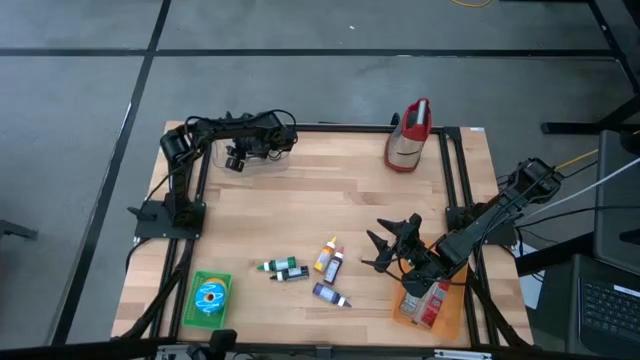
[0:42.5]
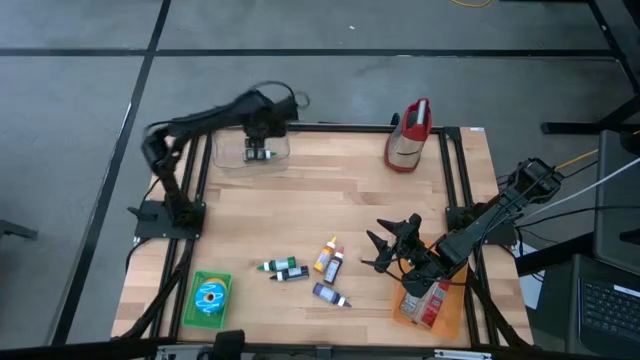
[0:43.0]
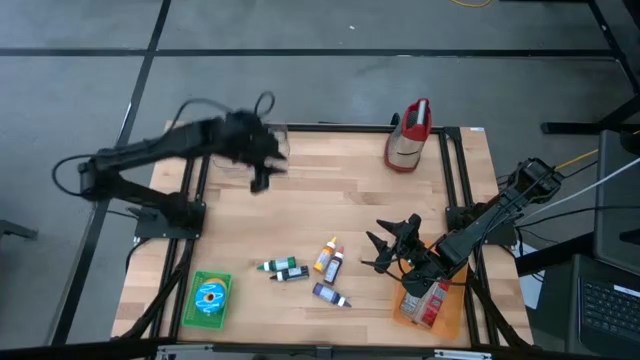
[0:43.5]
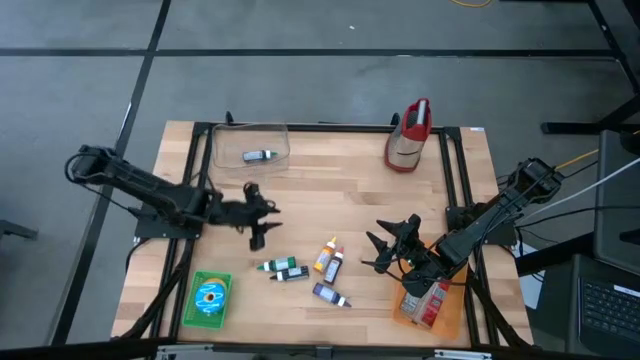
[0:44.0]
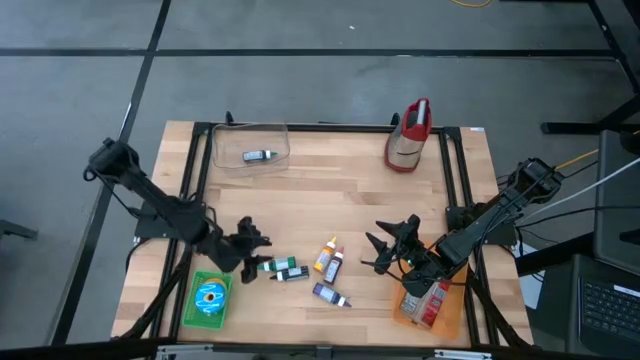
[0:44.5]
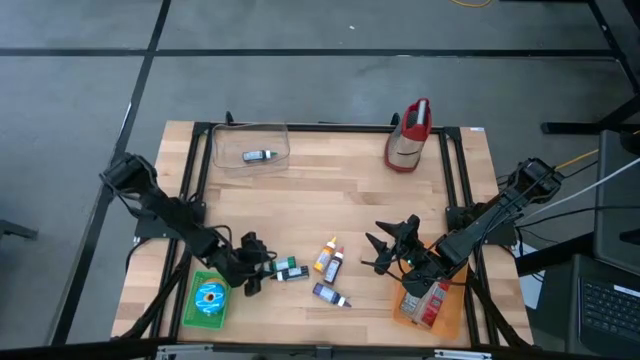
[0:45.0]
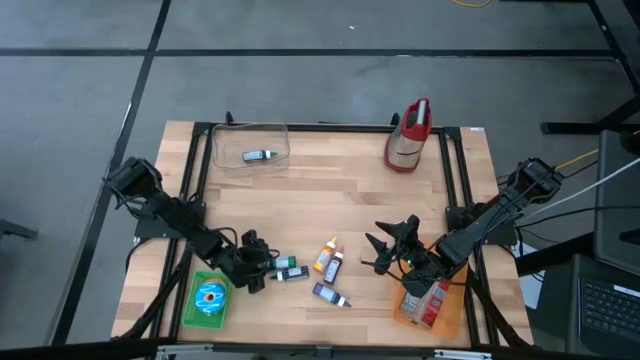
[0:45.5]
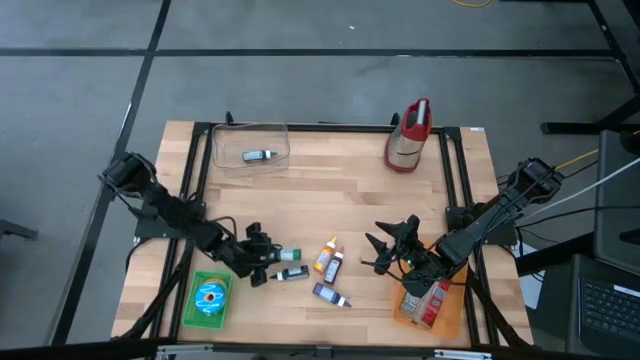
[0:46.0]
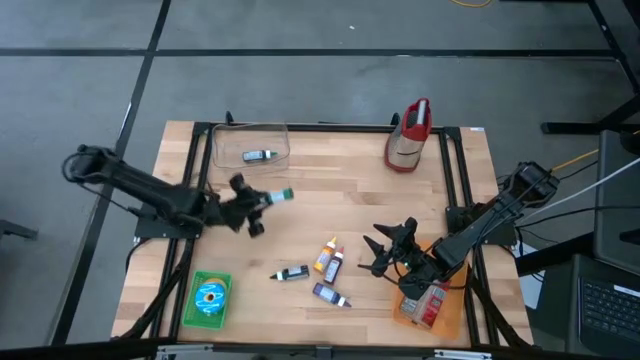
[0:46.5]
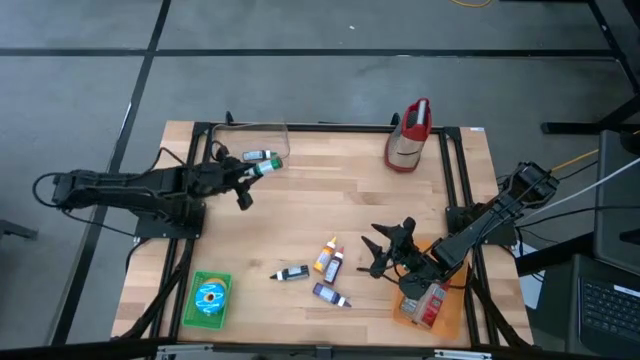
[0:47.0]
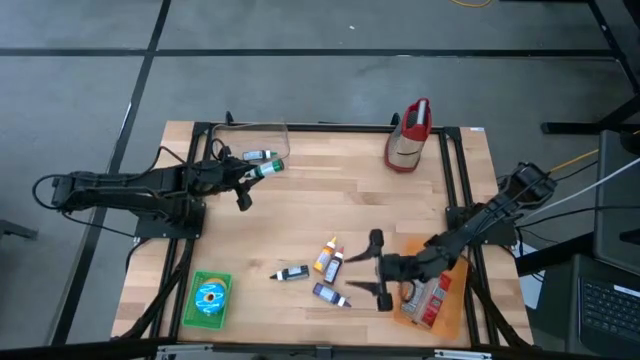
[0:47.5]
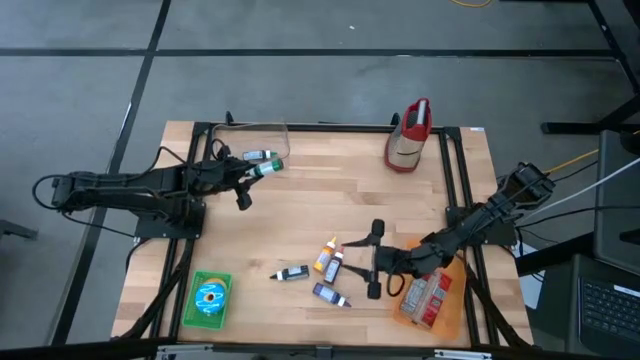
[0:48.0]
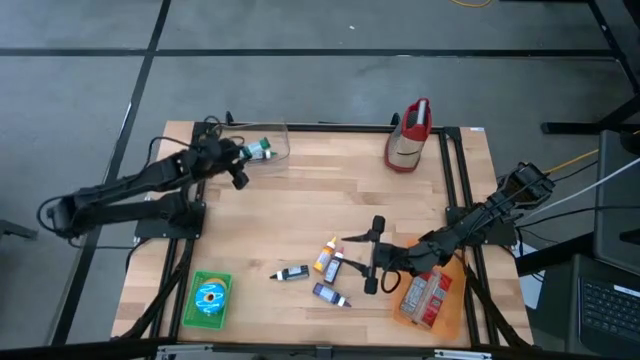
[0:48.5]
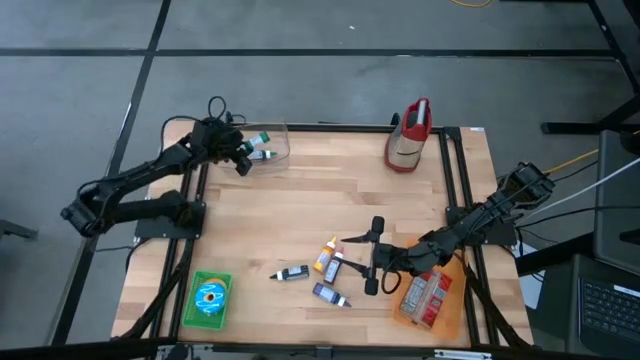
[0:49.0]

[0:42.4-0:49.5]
Put the green food coloring bottle into the white transparent bin

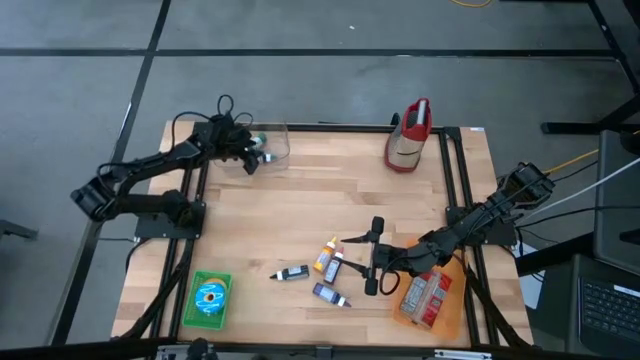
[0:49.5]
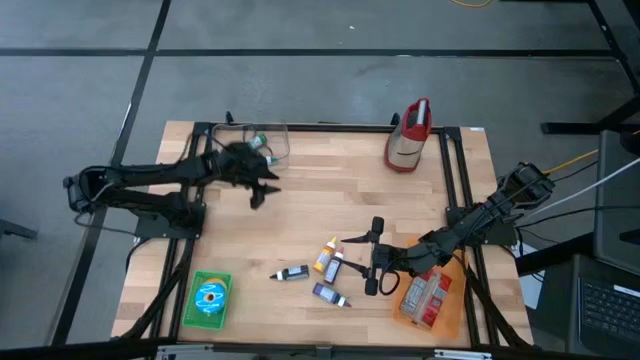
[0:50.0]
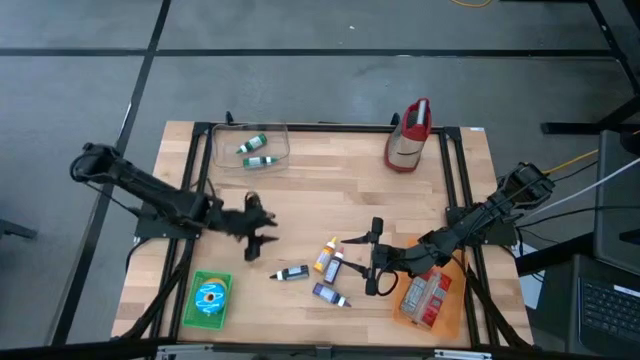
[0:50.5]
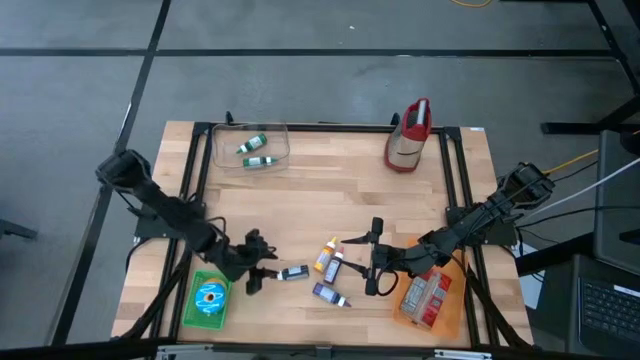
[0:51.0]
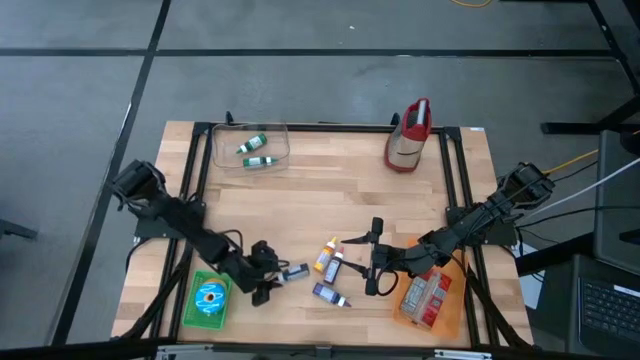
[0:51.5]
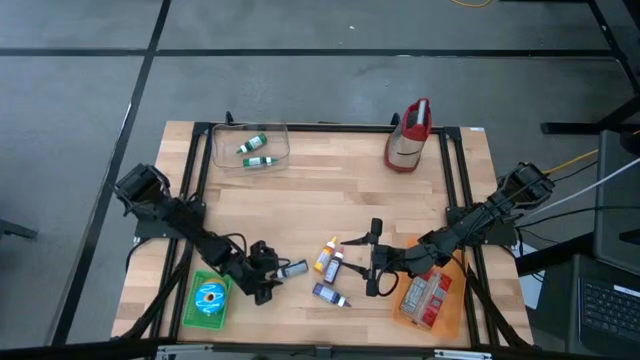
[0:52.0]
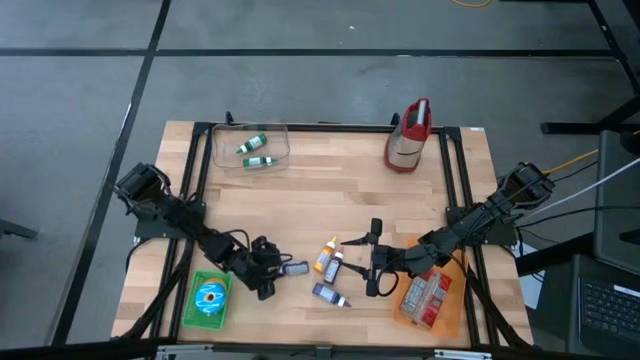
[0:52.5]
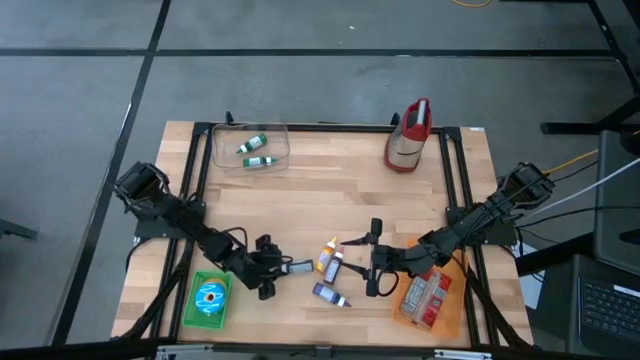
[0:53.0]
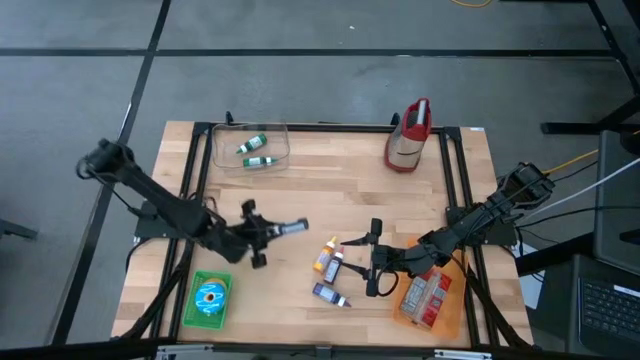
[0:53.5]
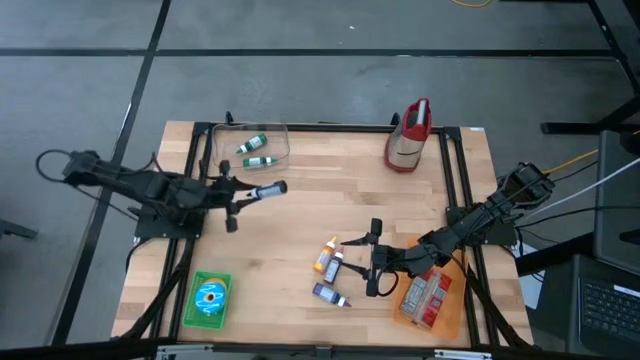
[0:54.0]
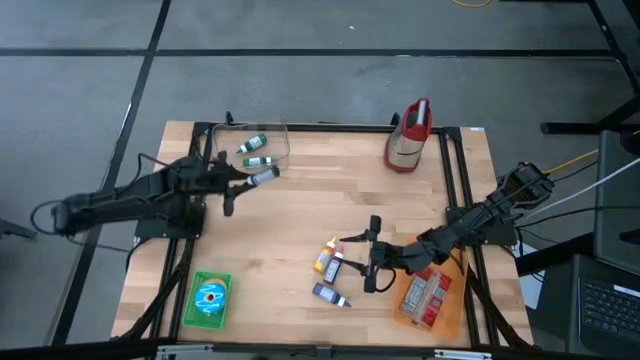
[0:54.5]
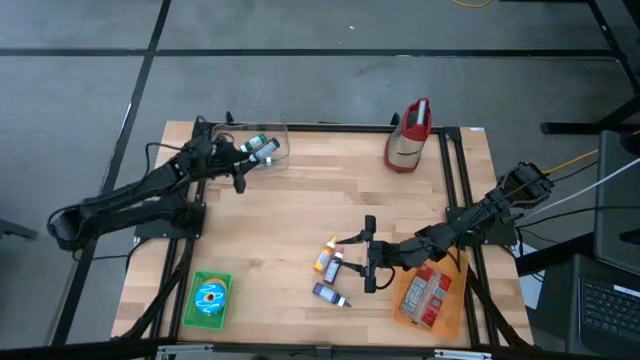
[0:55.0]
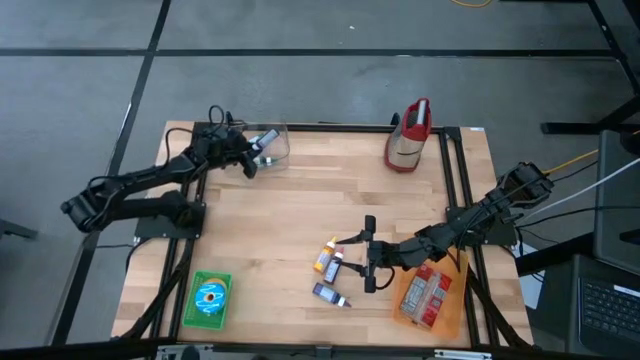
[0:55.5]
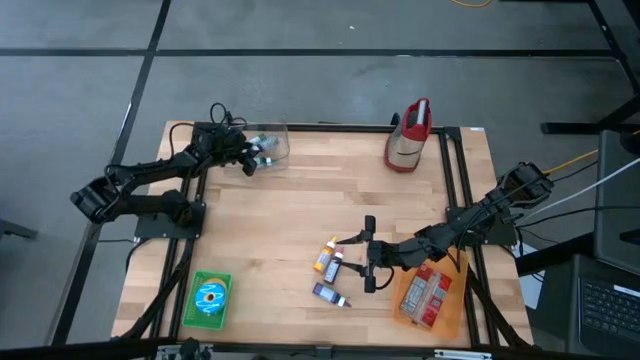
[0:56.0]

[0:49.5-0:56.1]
Put the black food coloring bottle into the white transparent bin

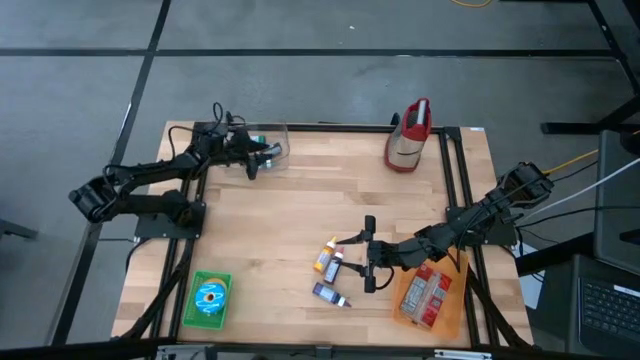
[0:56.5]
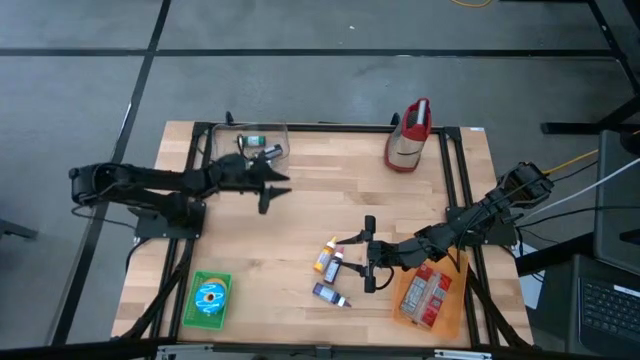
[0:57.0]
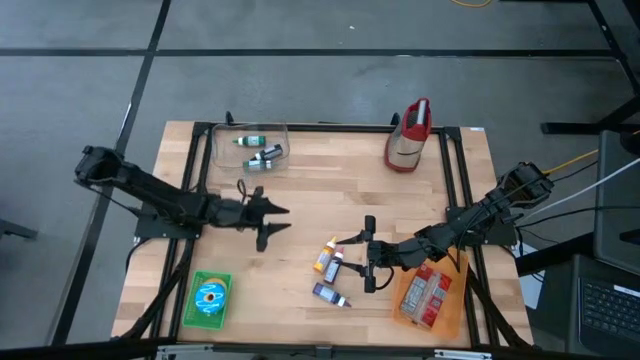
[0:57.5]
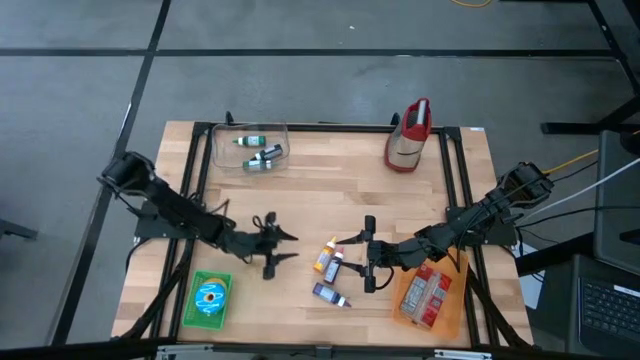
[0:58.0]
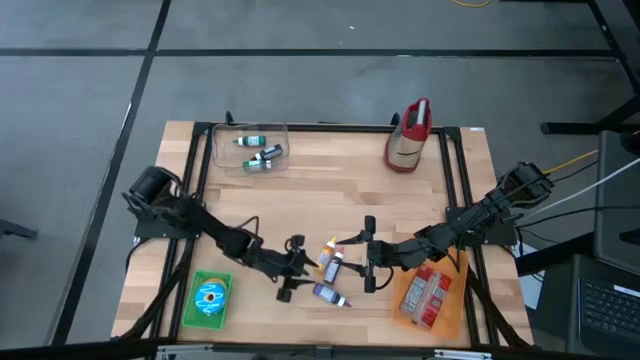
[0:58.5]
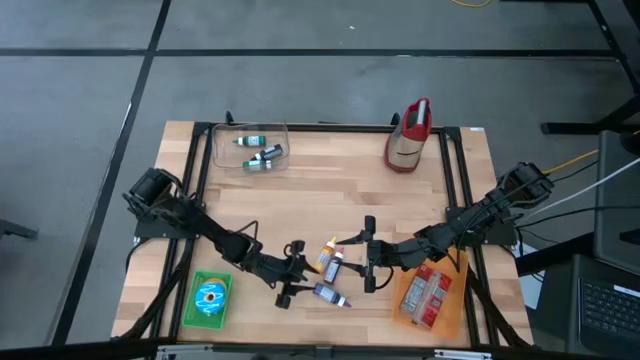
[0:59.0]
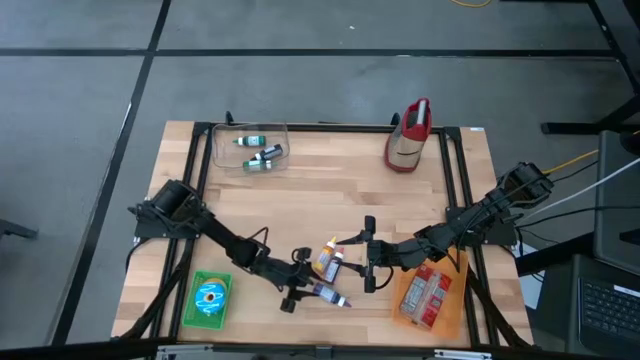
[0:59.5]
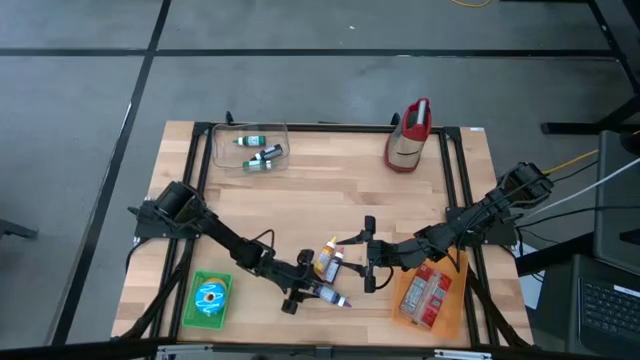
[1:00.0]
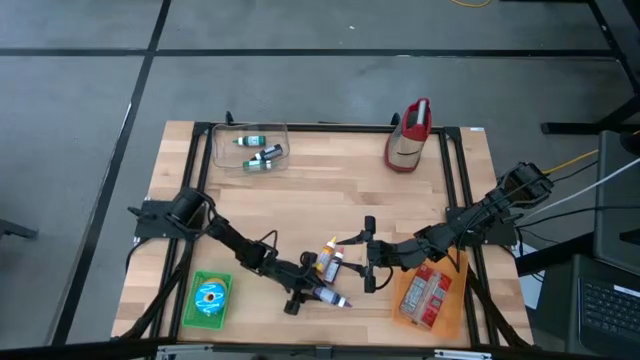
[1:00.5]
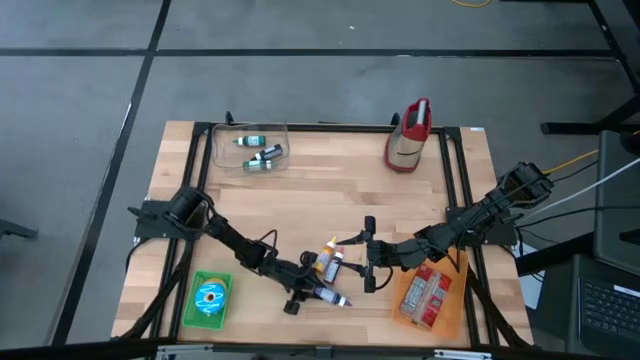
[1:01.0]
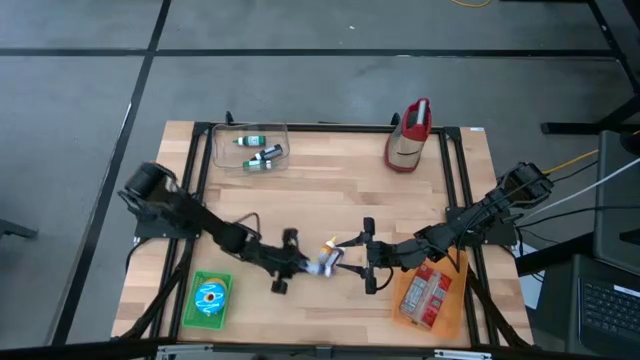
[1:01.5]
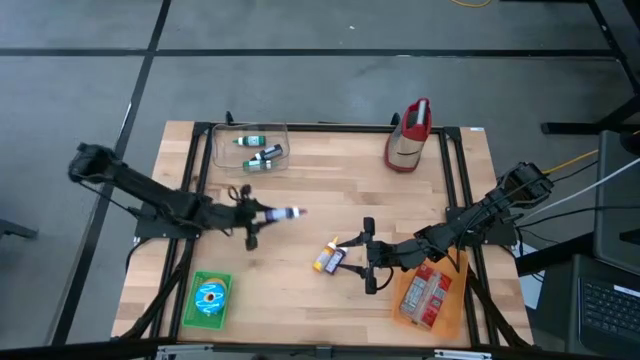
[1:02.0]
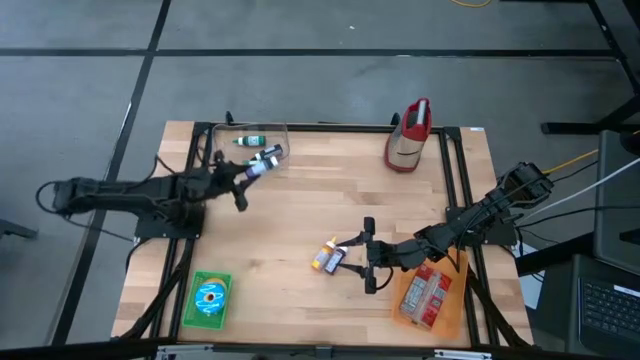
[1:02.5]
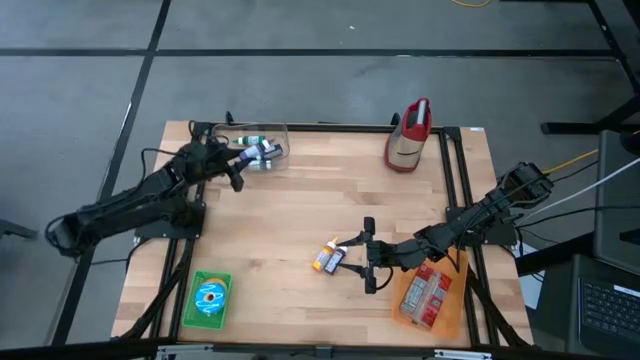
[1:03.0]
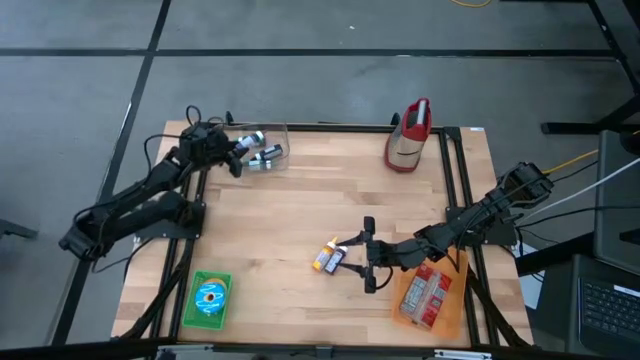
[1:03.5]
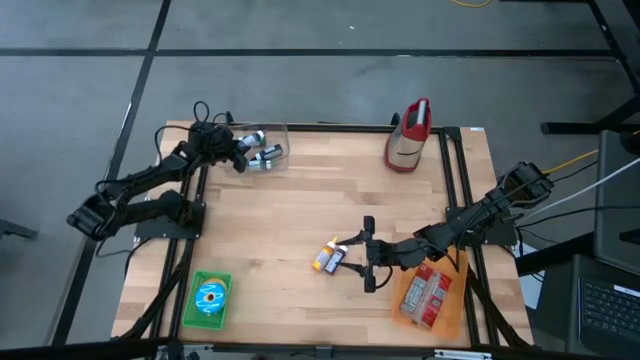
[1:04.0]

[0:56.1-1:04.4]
Put the violet food coloring bottle into the white transparent bin
